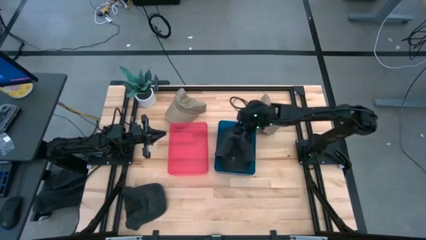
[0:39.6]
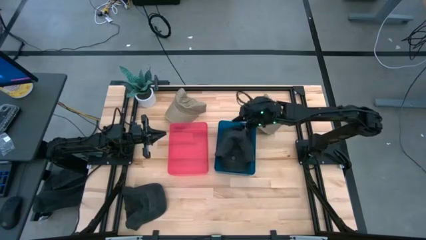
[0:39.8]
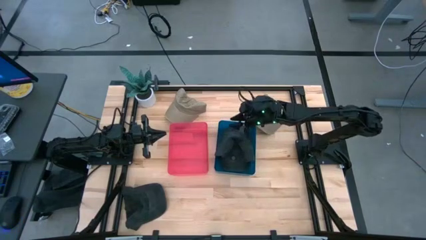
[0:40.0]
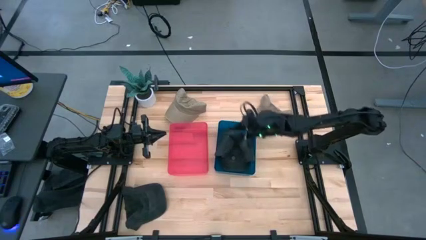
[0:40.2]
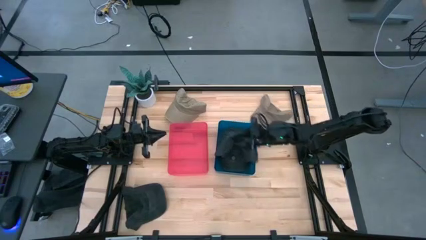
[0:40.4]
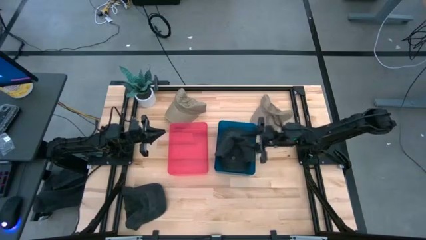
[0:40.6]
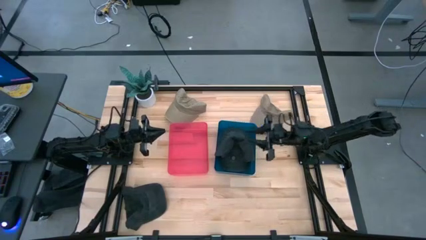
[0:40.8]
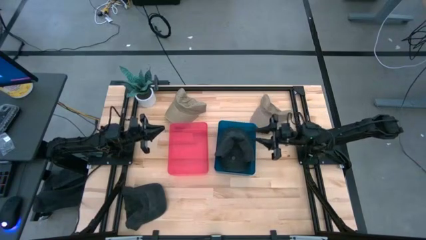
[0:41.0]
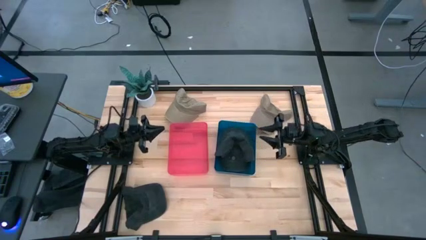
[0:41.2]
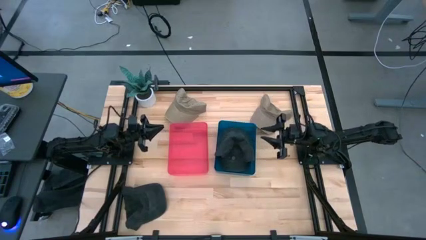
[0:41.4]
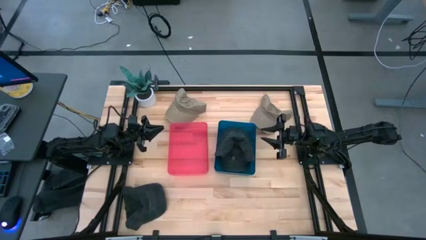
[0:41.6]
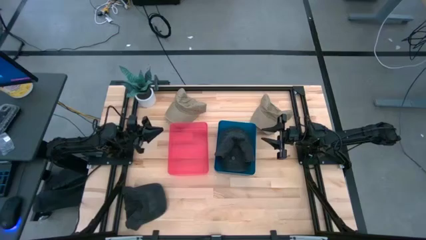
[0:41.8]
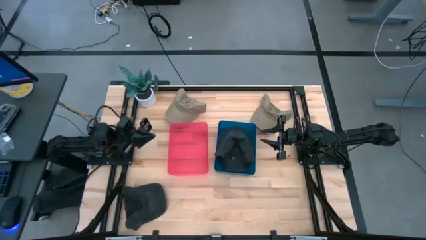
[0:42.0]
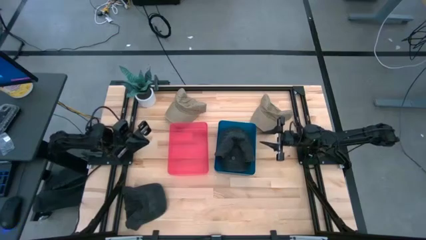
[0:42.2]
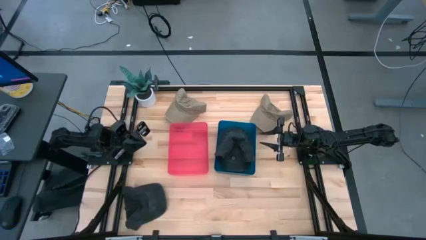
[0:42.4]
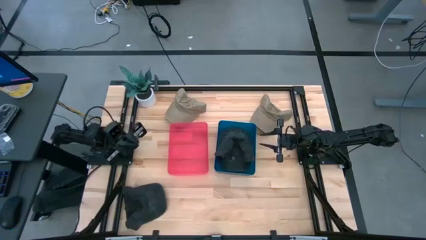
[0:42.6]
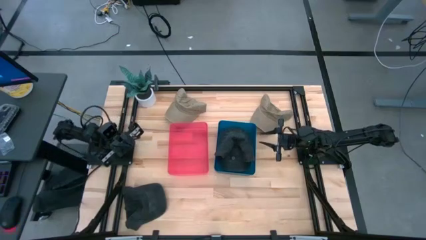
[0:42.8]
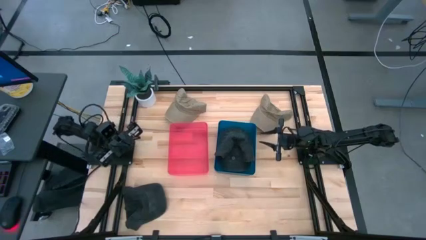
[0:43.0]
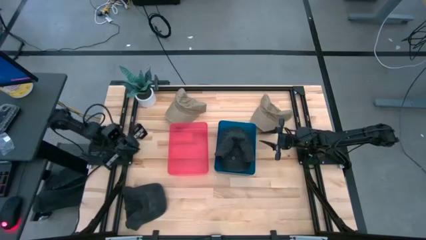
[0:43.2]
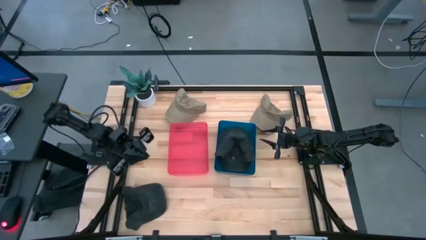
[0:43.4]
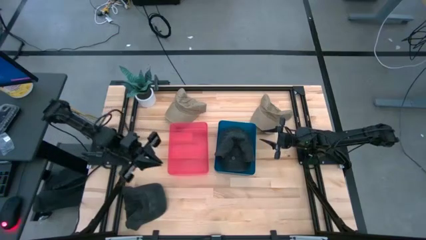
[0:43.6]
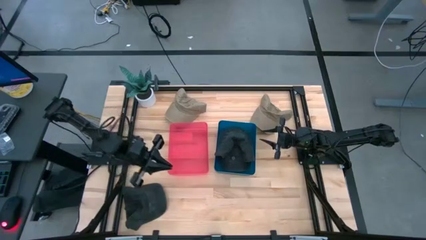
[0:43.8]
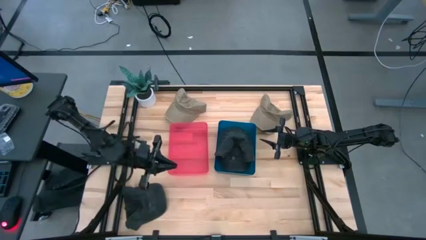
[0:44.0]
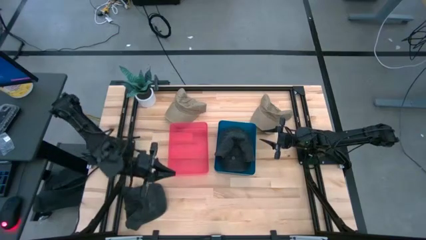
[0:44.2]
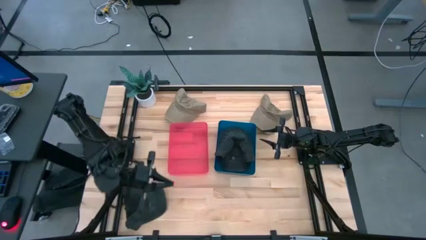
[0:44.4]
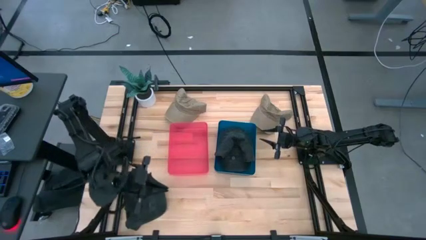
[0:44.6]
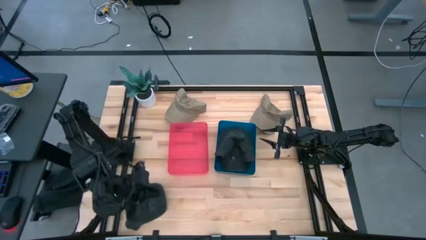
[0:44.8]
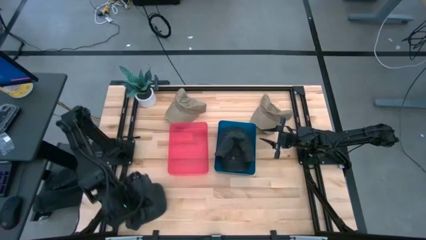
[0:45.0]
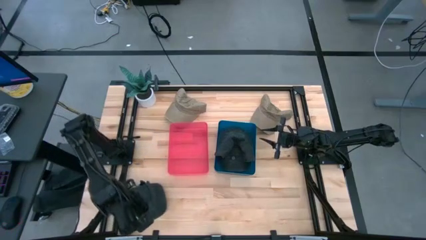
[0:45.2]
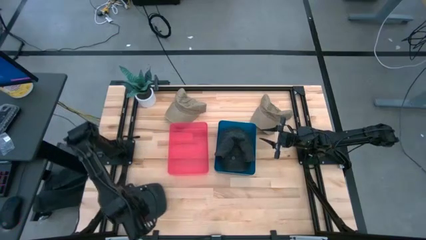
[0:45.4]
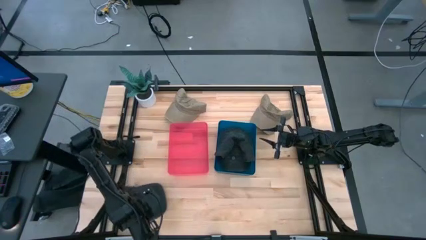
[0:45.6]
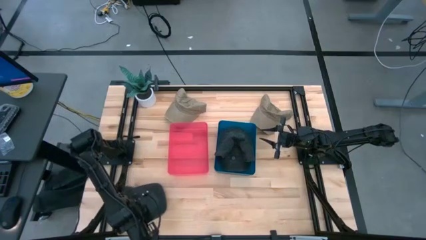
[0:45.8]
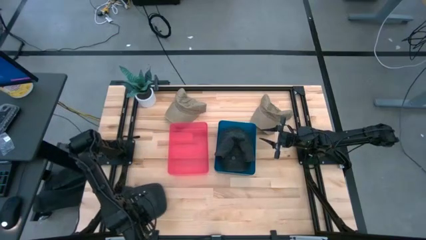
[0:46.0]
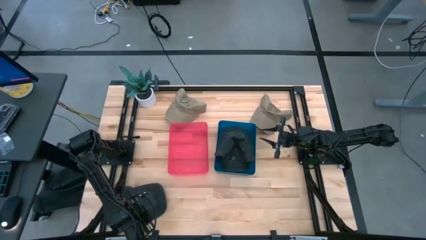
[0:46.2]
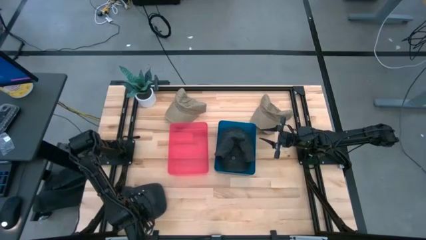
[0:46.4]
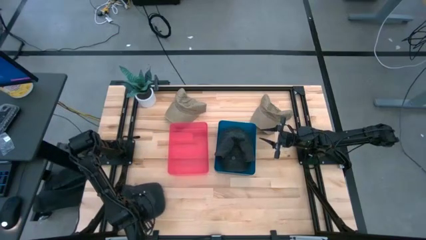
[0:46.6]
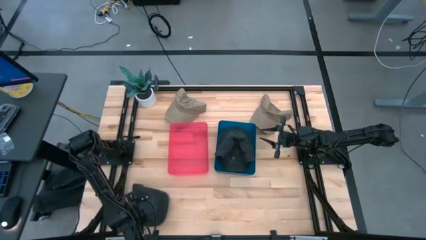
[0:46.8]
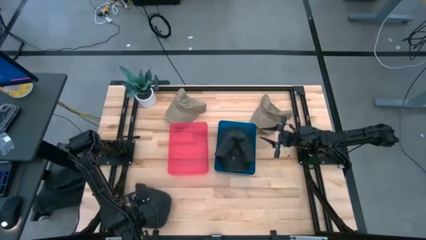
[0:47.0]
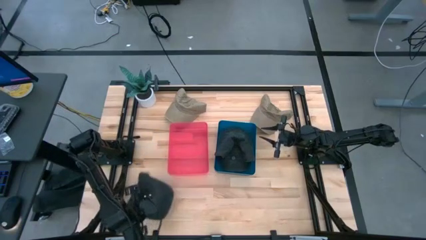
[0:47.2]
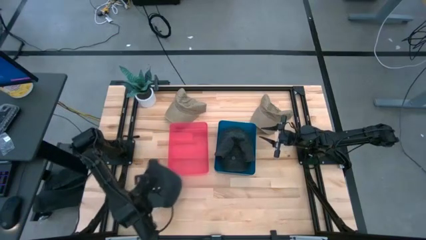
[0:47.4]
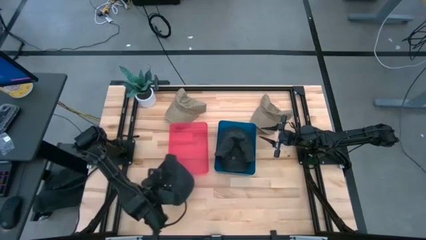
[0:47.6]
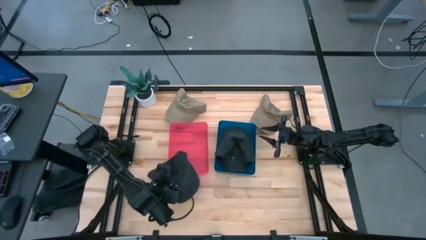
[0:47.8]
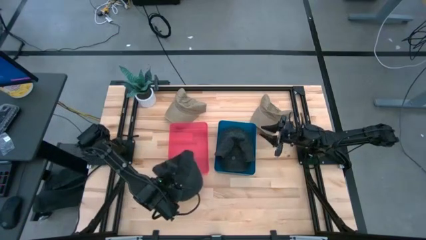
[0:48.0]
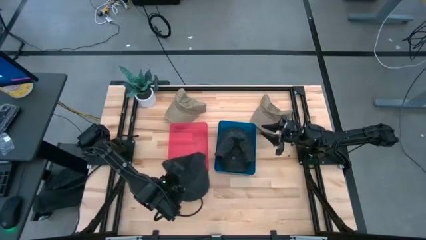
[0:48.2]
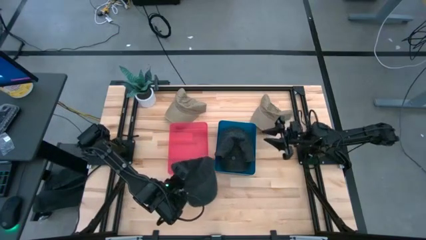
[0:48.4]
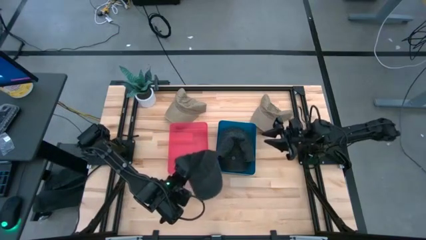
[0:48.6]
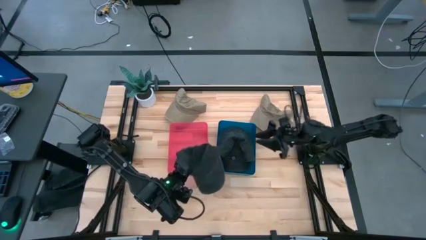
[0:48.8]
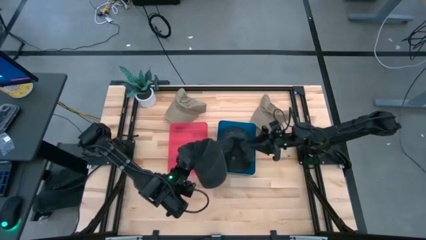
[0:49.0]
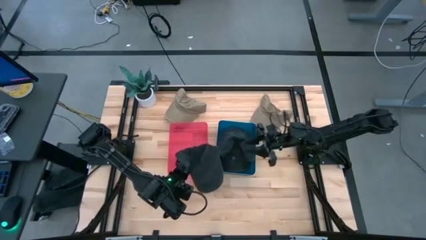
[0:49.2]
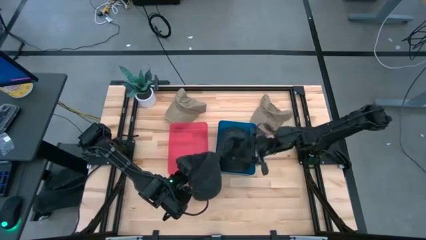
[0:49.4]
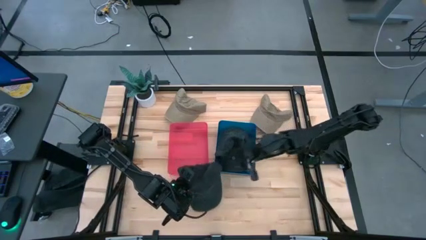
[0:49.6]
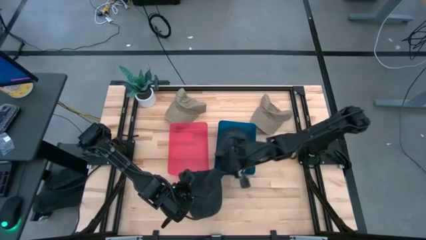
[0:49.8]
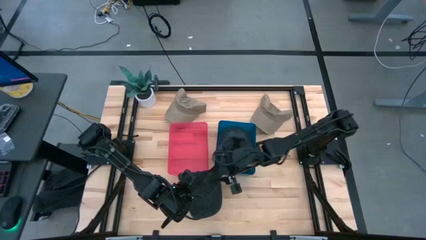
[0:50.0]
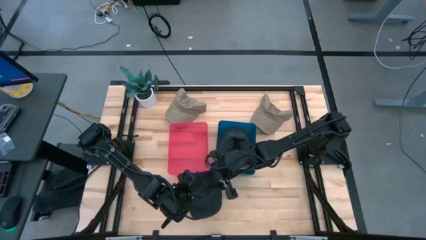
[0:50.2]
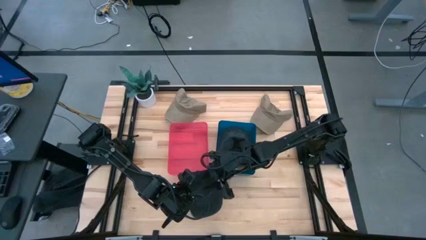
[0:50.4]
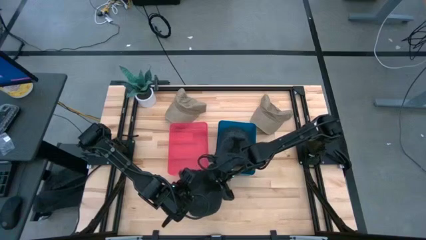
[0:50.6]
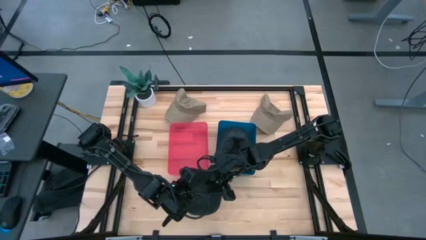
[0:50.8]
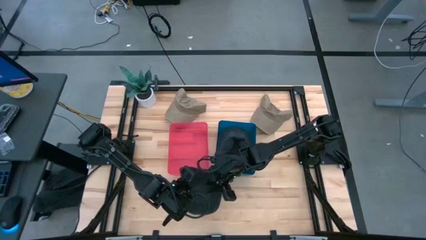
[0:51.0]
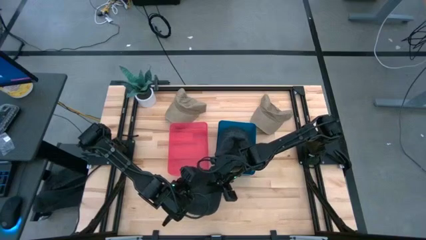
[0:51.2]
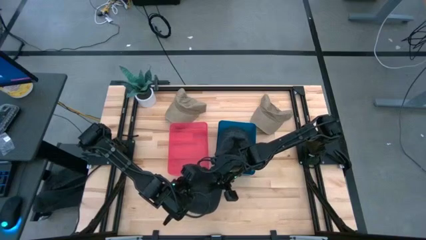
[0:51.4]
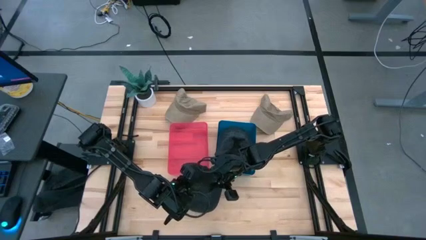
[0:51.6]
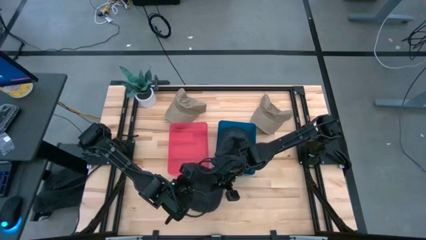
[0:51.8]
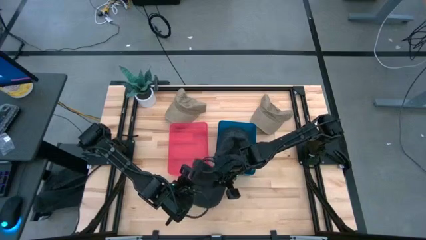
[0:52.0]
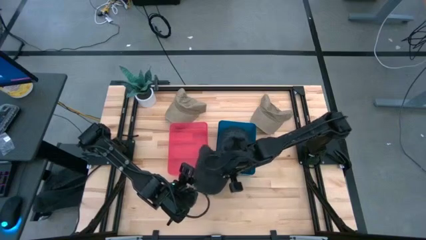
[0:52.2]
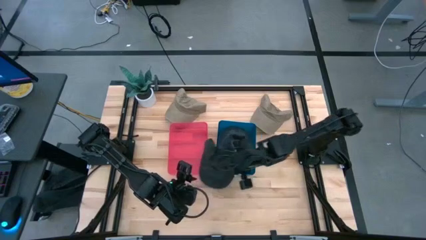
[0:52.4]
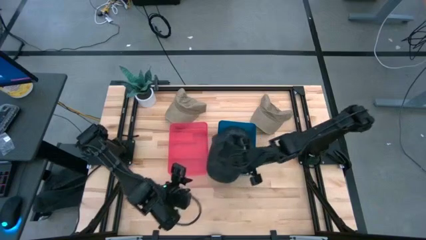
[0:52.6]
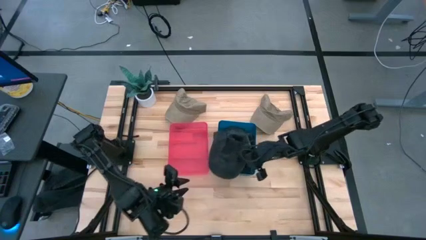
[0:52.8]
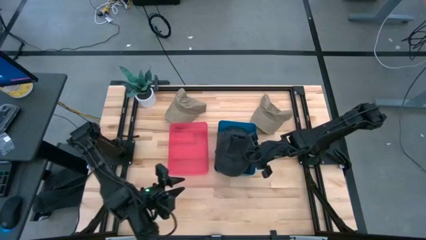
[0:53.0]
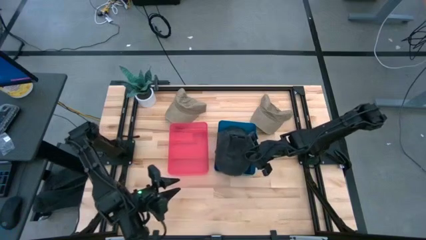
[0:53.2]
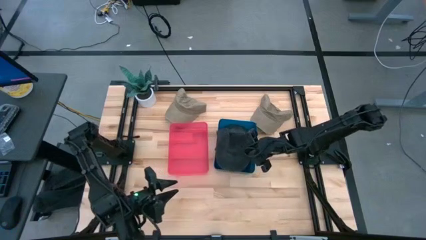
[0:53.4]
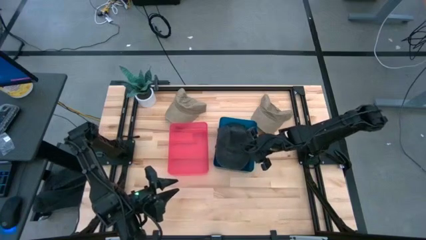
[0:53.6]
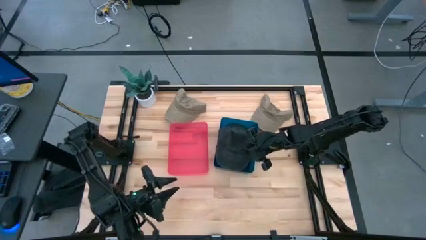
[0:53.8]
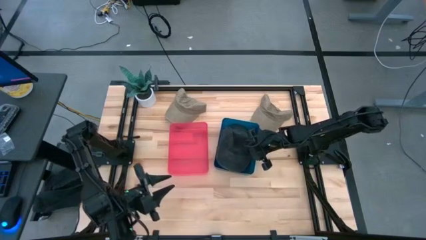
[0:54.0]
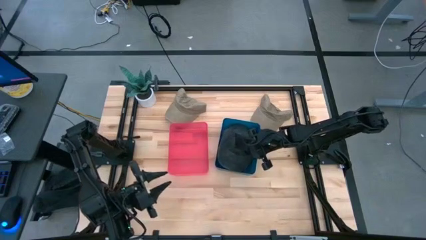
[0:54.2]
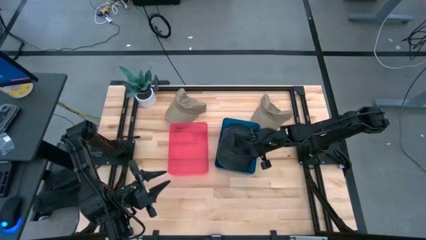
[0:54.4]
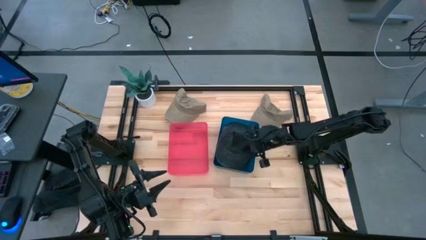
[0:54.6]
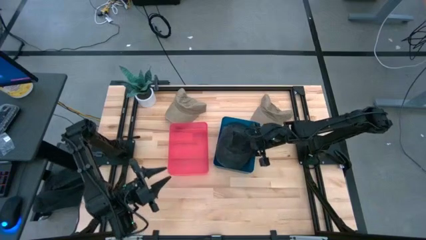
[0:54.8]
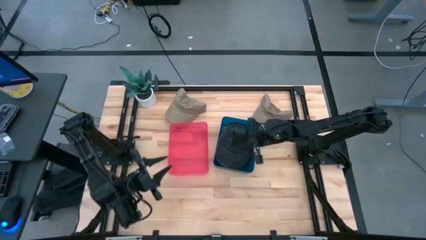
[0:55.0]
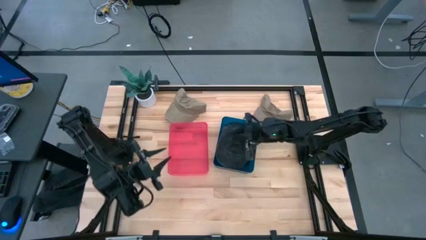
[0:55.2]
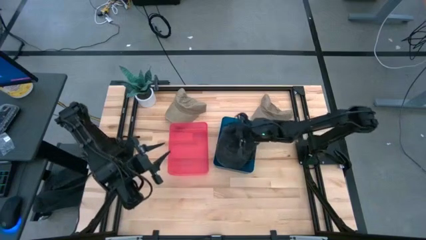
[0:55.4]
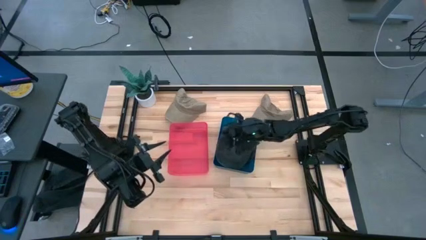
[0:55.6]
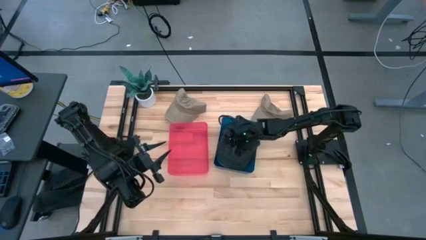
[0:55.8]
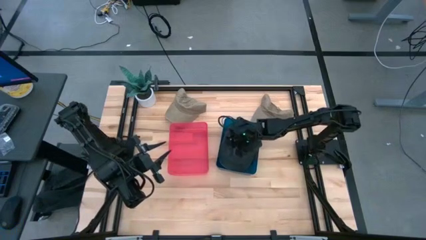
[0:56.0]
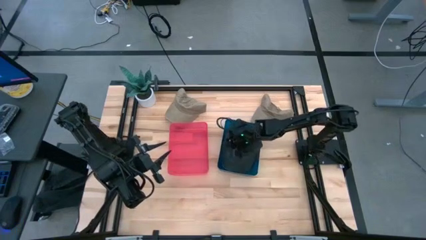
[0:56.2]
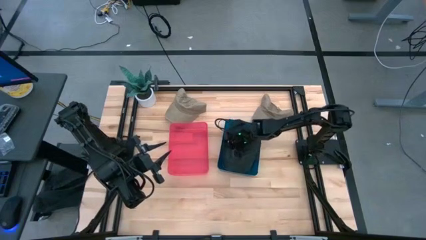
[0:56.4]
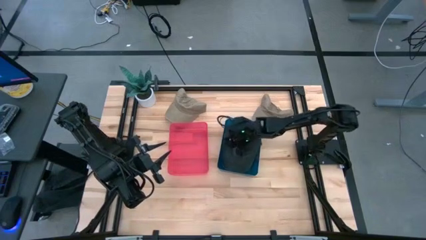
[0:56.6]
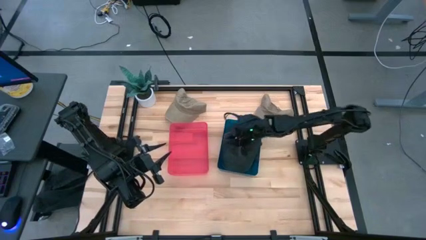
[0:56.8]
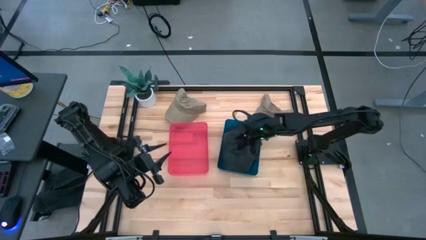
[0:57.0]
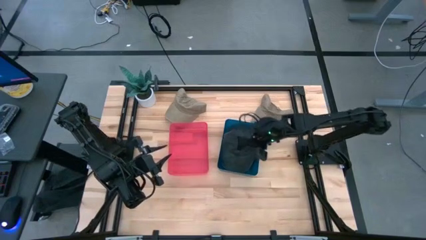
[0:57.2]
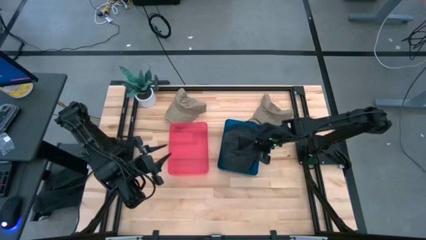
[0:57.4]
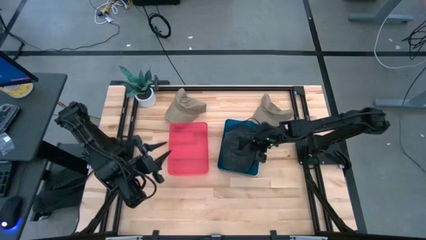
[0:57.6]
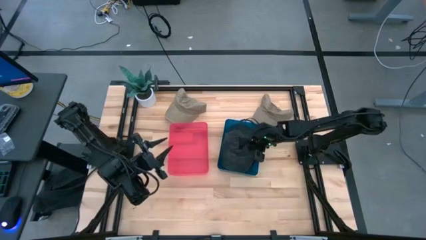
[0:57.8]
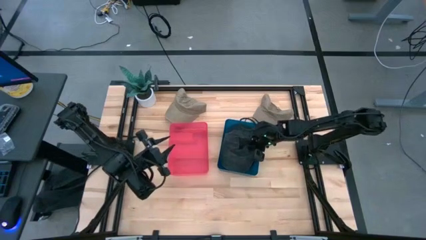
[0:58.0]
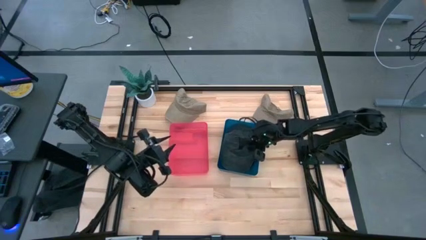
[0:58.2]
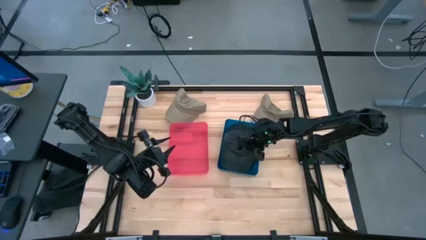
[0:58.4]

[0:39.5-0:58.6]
Task: Pick & Place hat
Put the black cap into the blue bin
